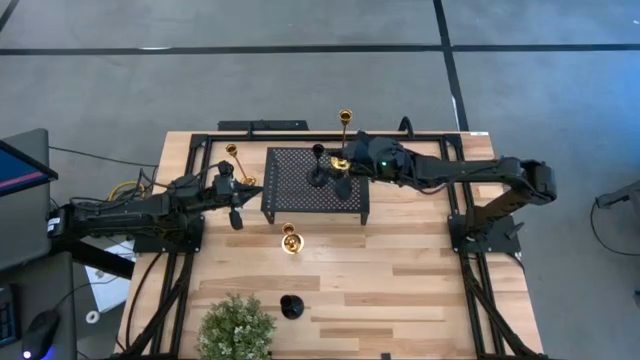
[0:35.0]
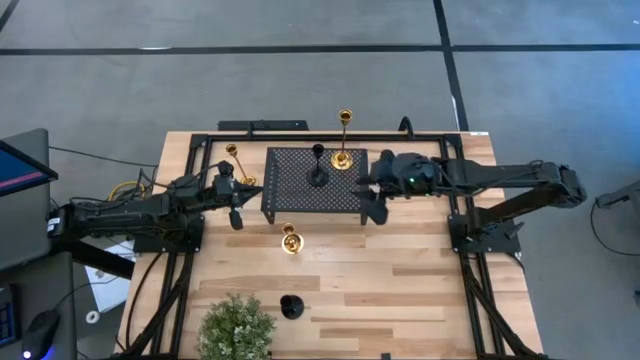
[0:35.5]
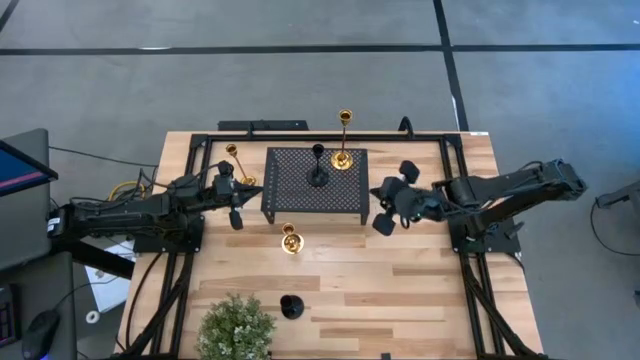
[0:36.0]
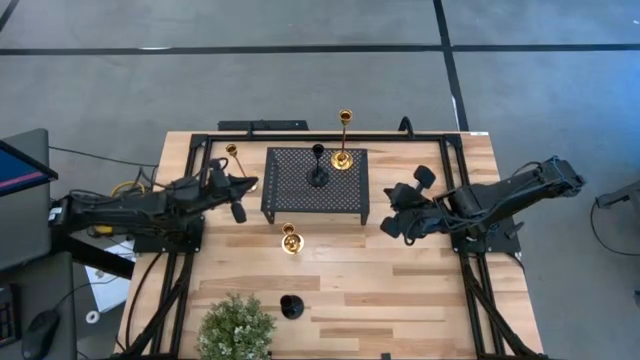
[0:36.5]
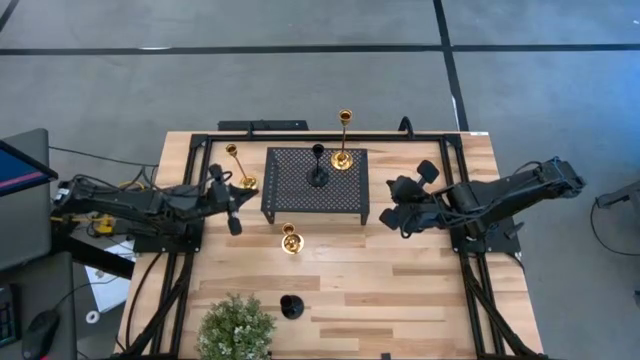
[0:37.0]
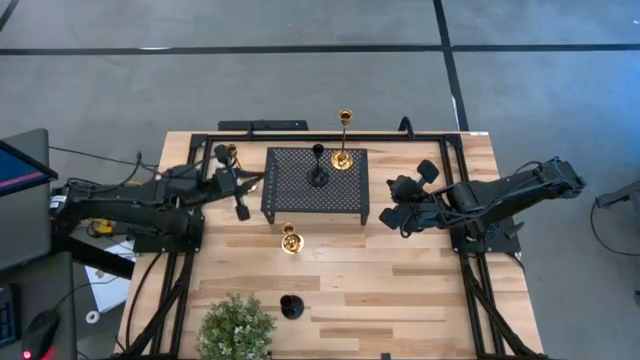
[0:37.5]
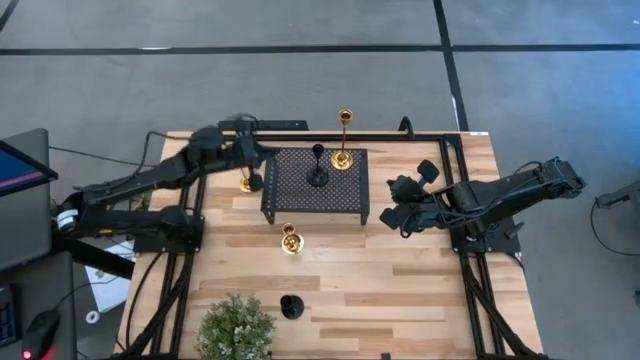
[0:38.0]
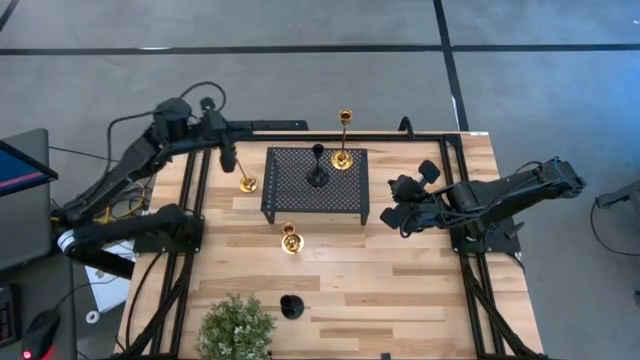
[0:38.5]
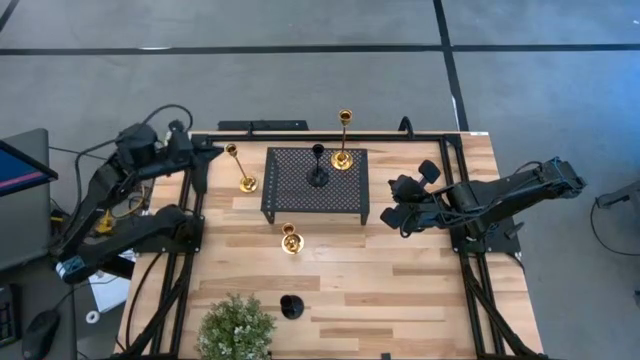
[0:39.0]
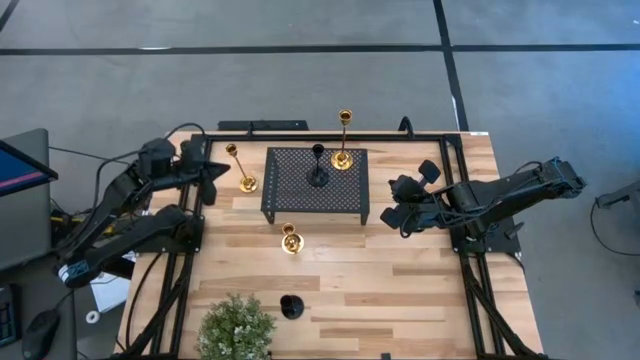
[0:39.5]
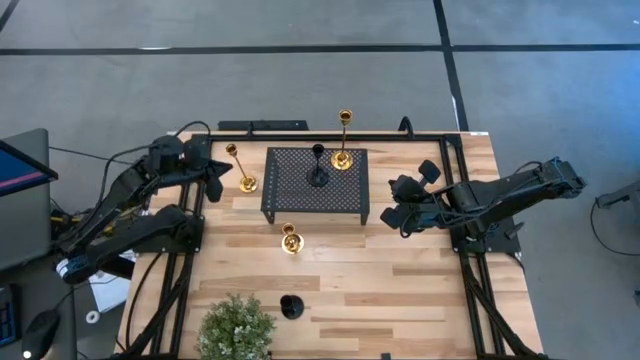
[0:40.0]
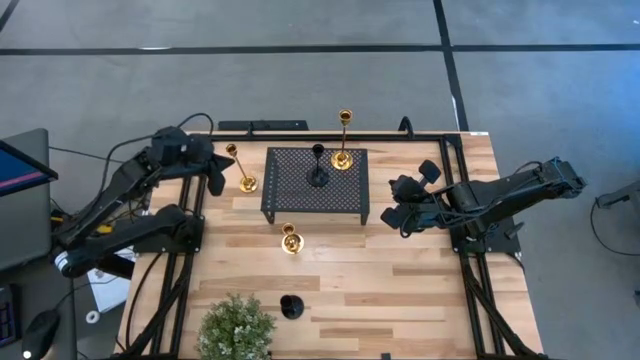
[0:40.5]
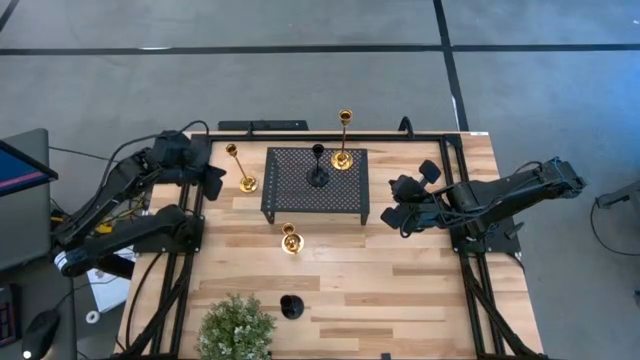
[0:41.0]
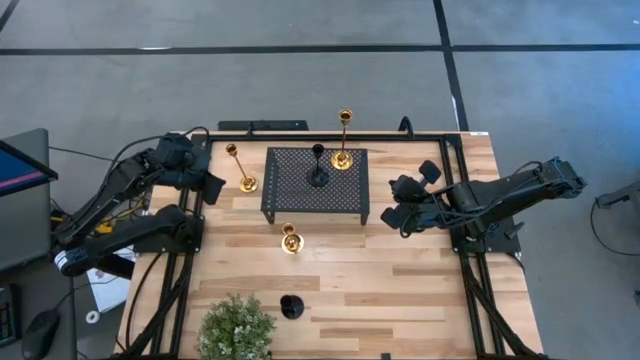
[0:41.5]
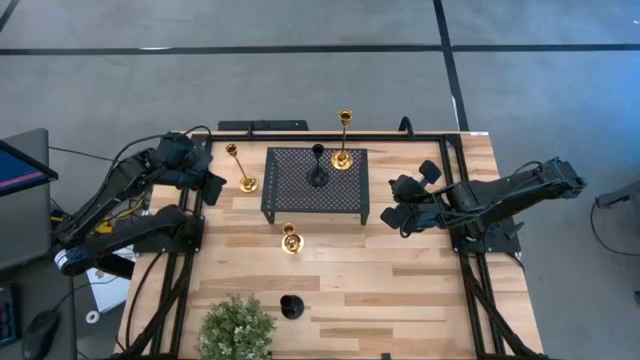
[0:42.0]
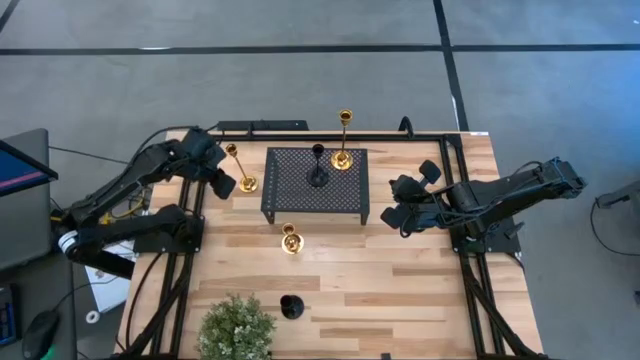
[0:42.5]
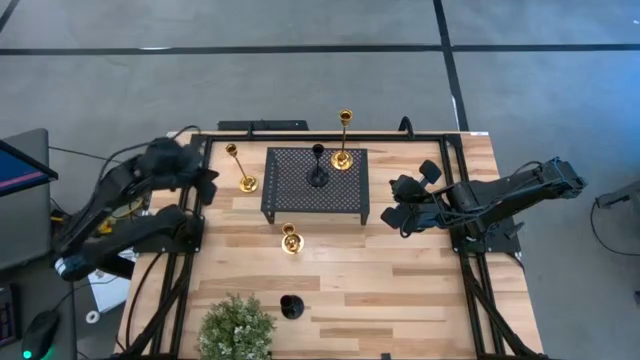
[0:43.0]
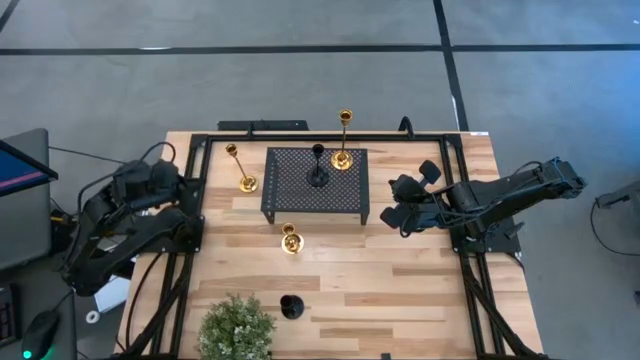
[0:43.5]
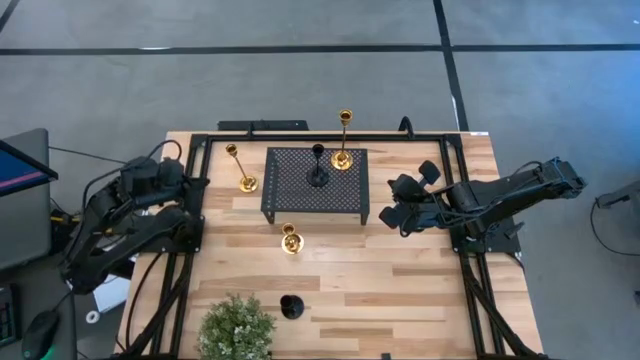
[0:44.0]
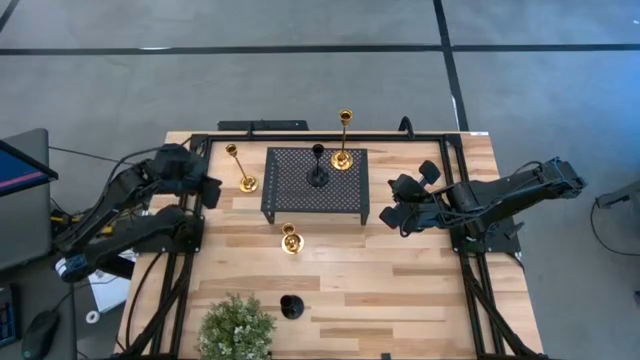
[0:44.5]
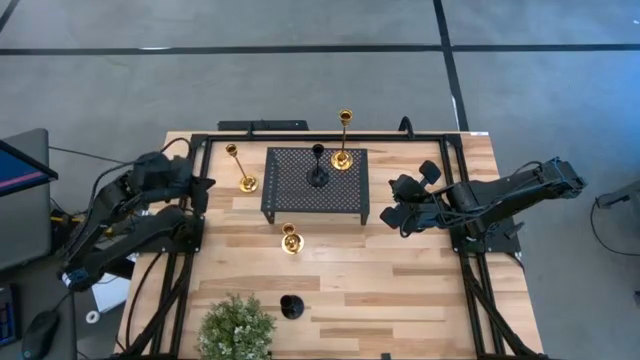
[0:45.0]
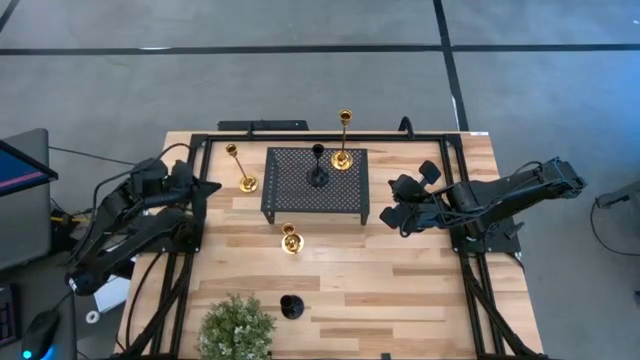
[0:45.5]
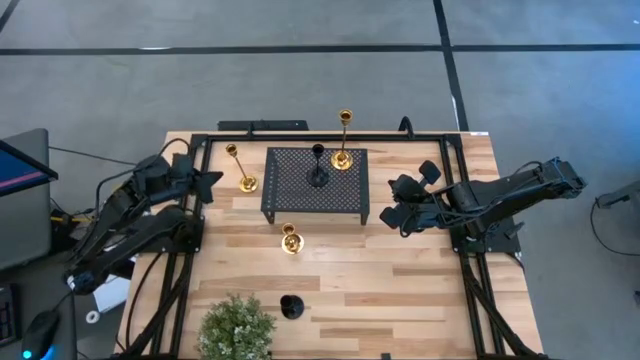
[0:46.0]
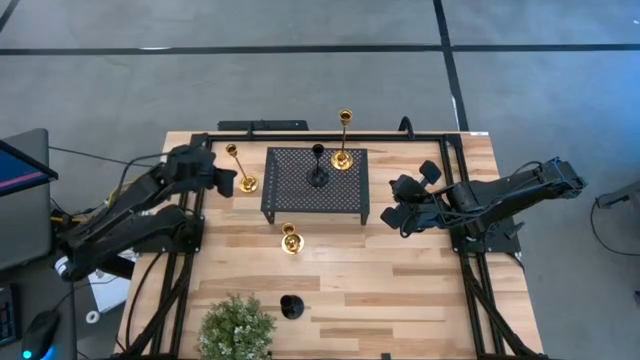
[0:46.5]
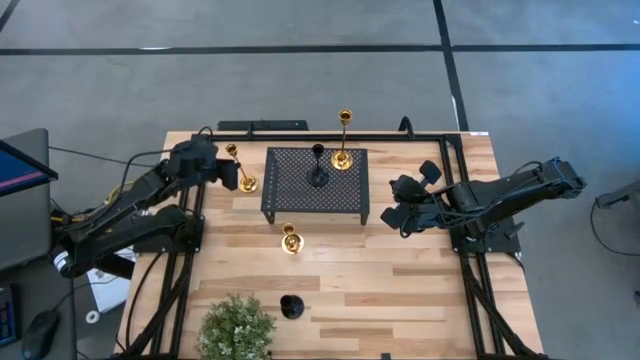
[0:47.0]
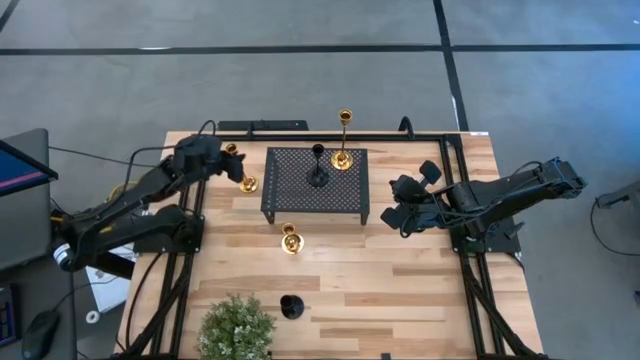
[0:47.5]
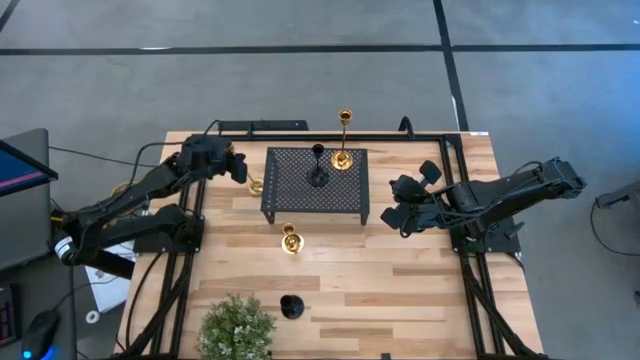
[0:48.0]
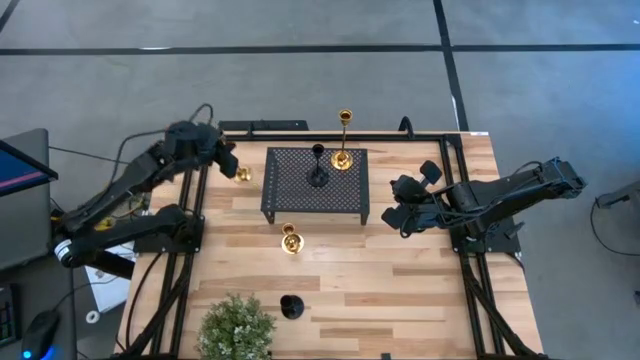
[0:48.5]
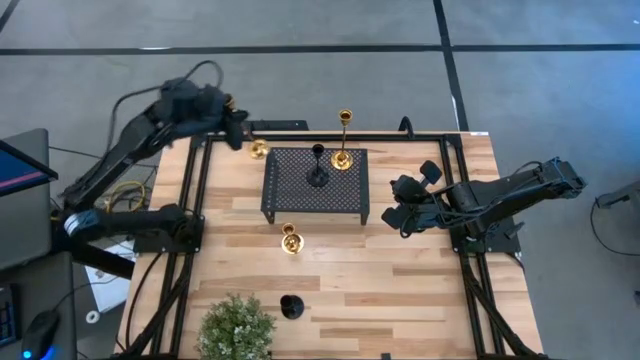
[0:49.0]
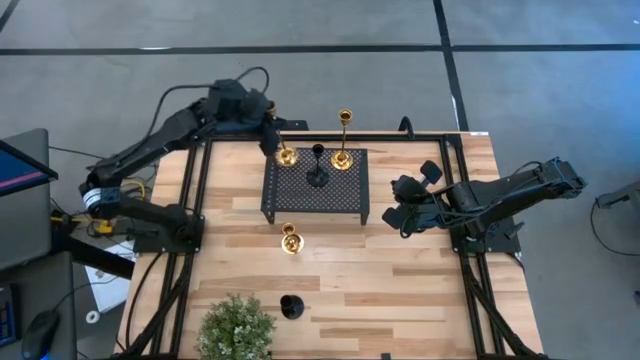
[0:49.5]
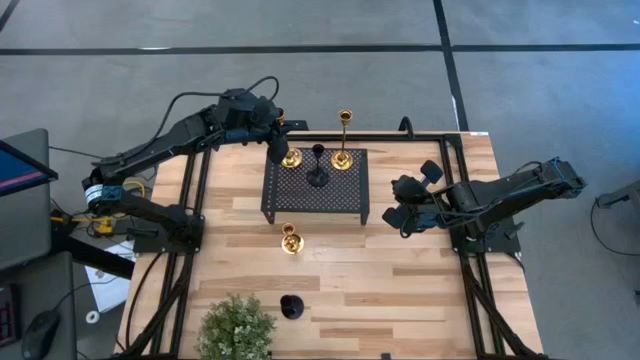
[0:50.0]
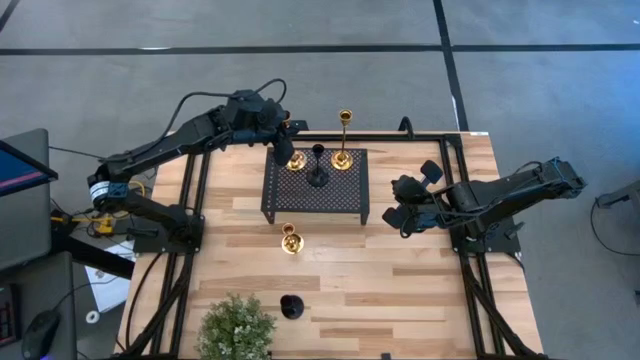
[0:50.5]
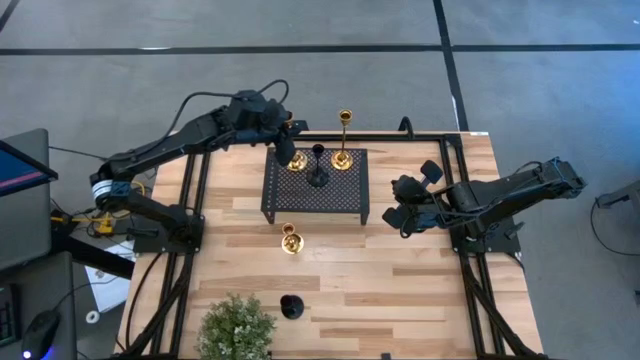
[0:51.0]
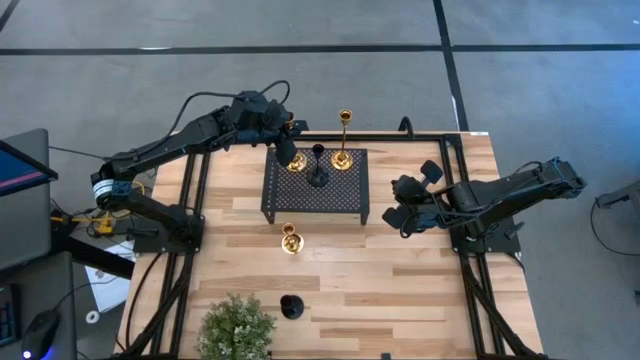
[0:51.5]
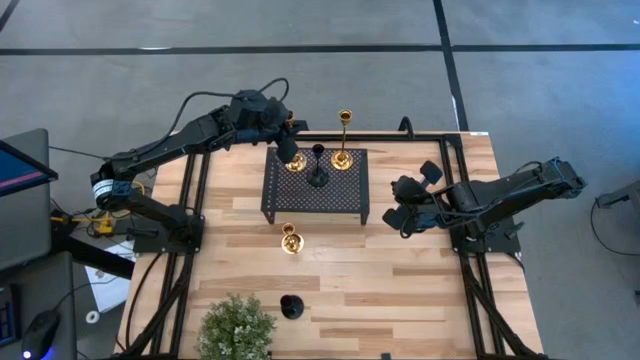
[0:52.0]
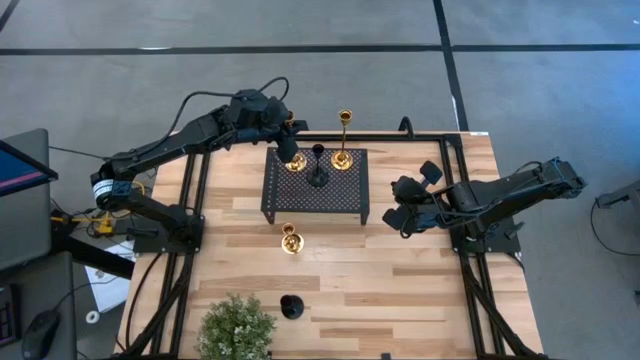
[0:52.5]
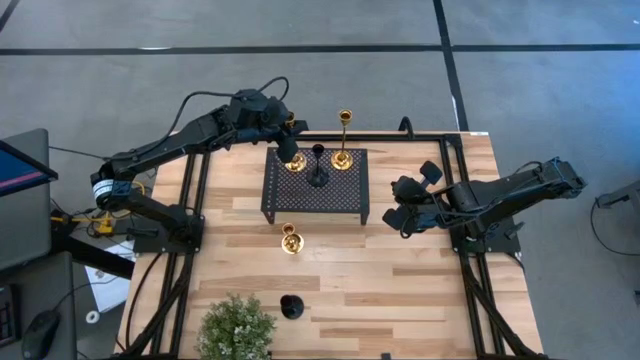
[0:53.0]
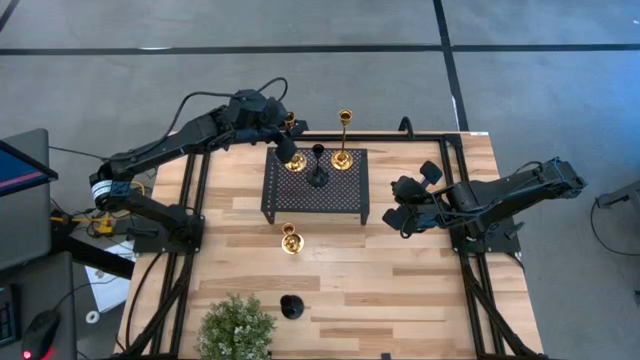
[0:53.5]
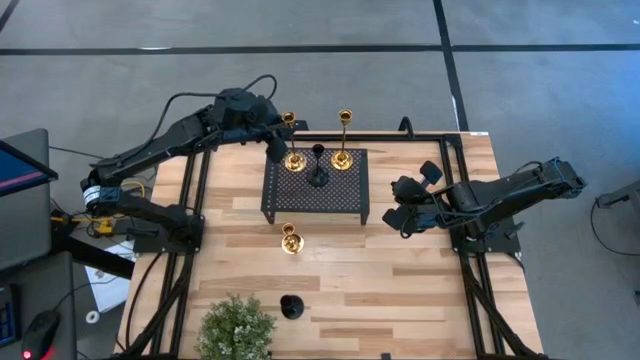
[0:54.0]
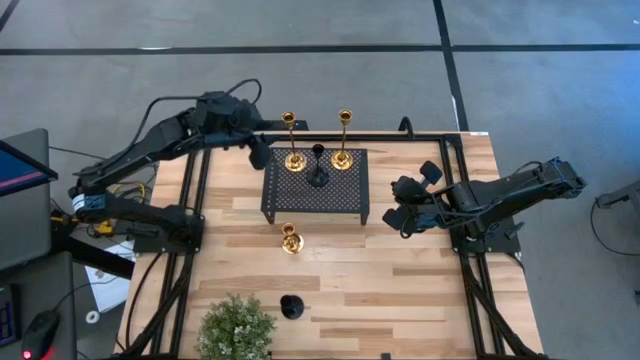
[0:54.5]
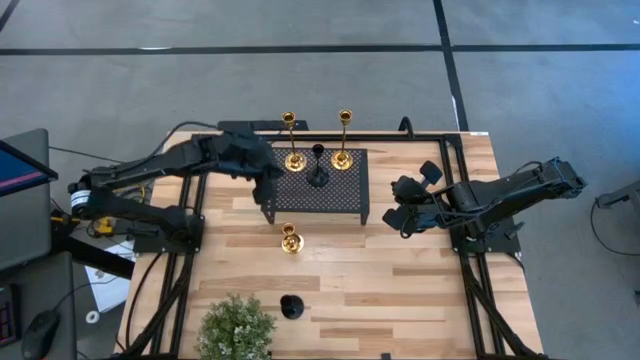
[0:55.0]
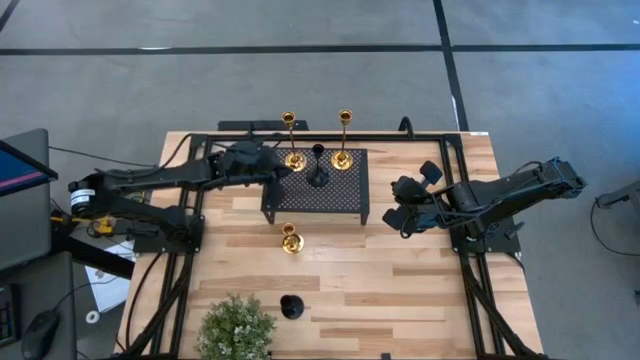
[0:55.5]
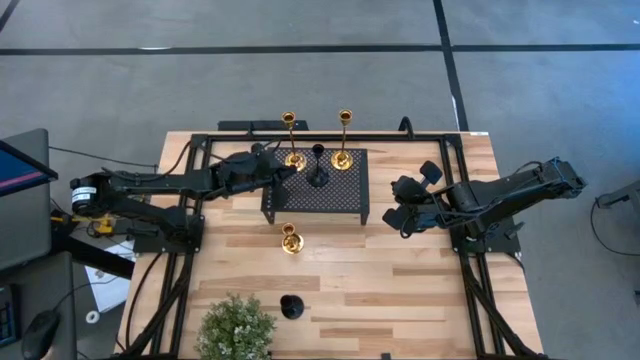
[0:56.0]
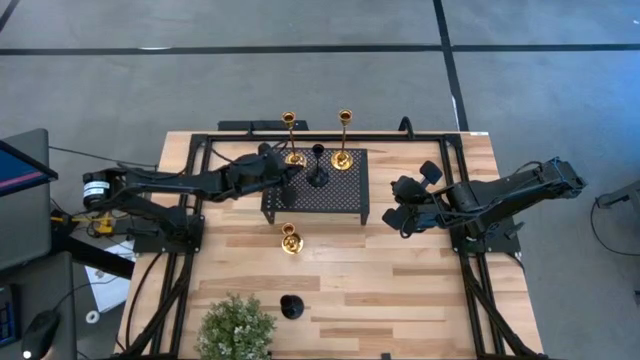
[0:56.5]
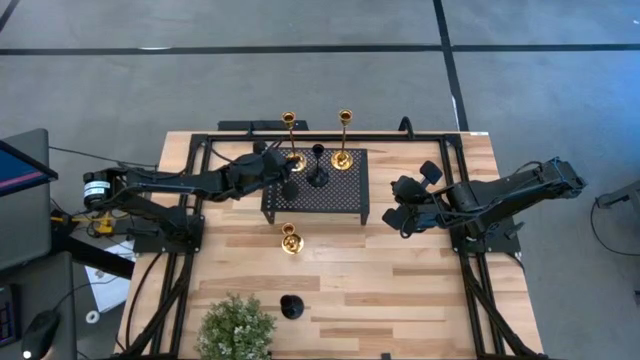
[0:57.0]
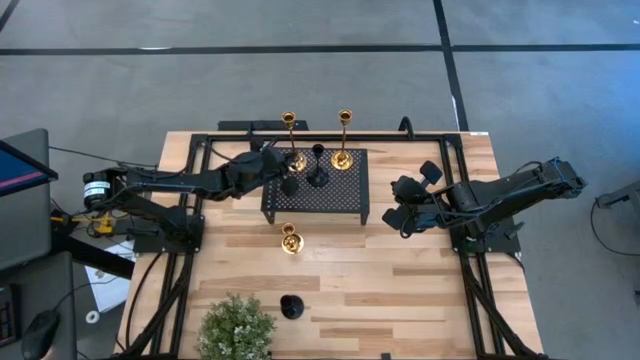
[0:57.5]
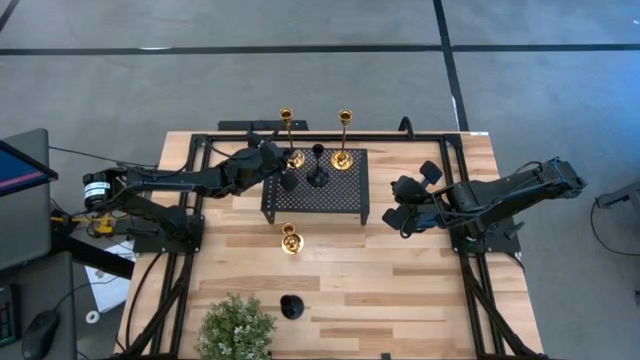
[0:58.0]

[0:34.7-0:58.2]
Task: Pick & Place candle stick holders
Put the large gold candle holder on the shelf
